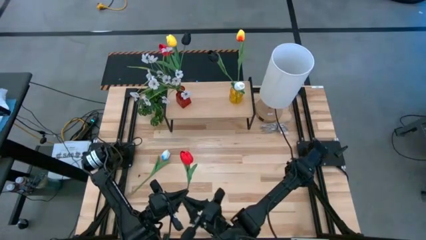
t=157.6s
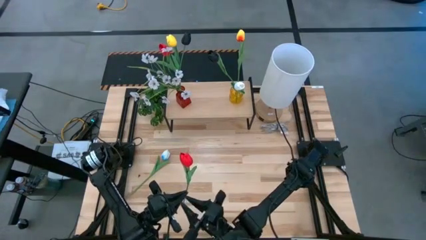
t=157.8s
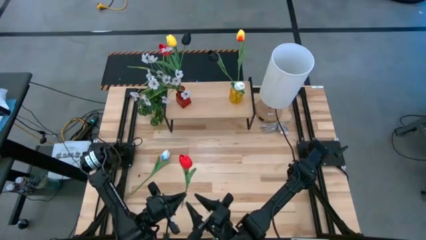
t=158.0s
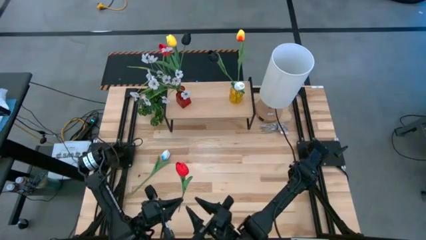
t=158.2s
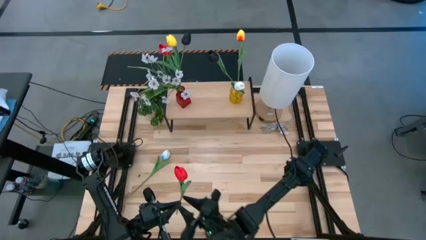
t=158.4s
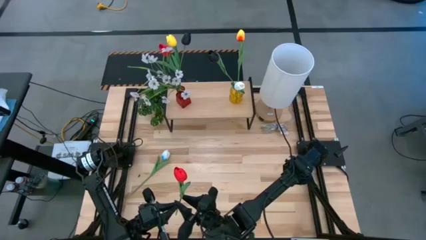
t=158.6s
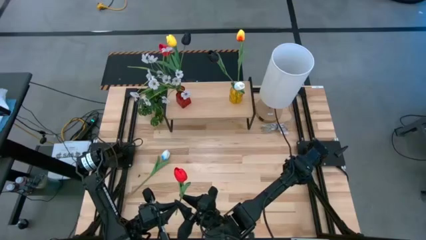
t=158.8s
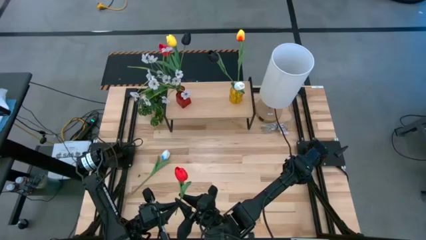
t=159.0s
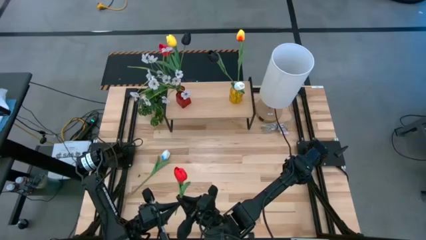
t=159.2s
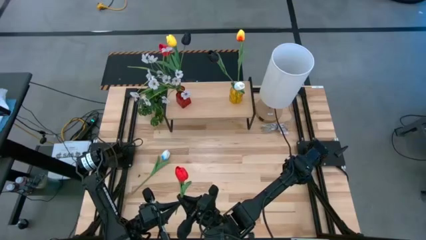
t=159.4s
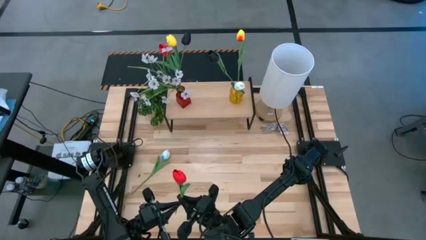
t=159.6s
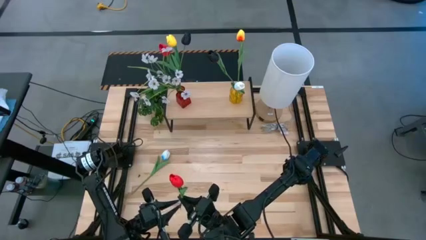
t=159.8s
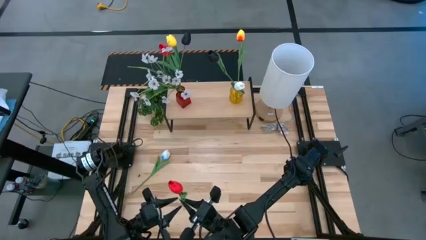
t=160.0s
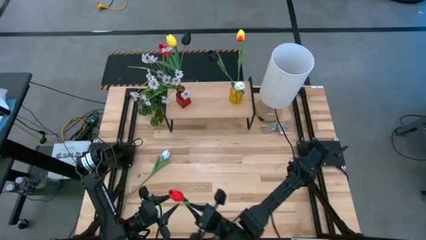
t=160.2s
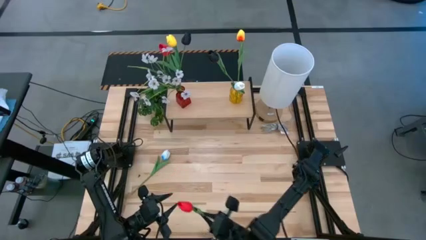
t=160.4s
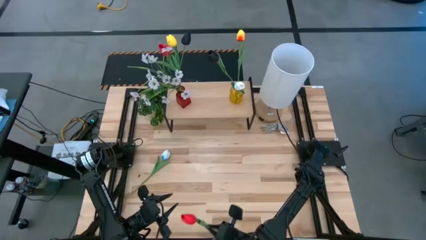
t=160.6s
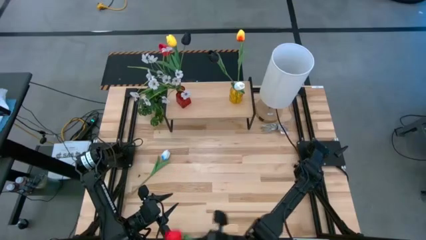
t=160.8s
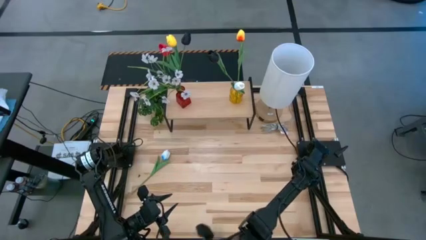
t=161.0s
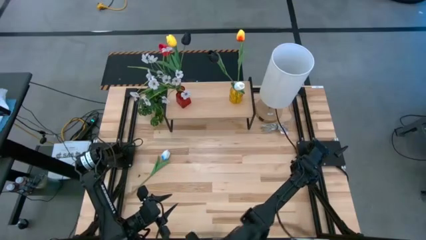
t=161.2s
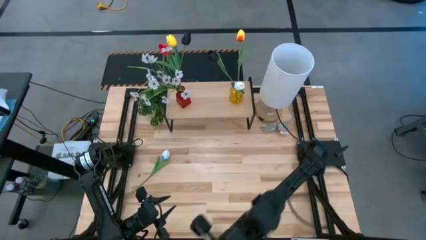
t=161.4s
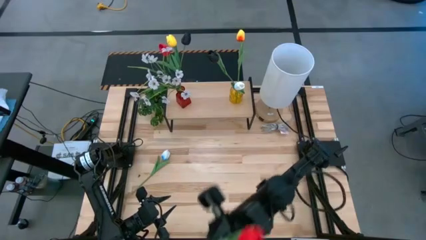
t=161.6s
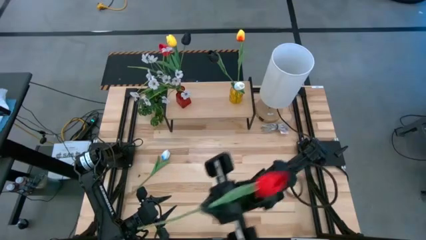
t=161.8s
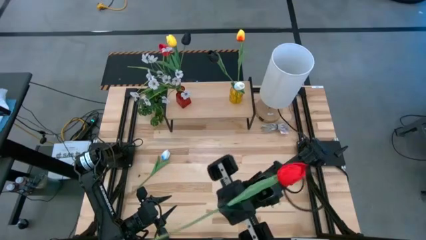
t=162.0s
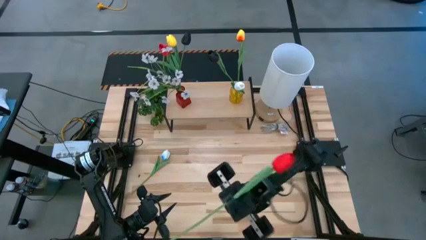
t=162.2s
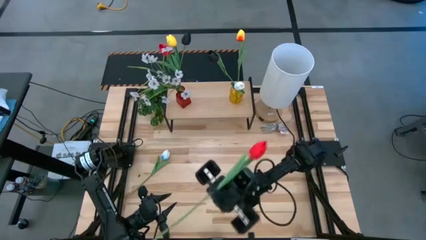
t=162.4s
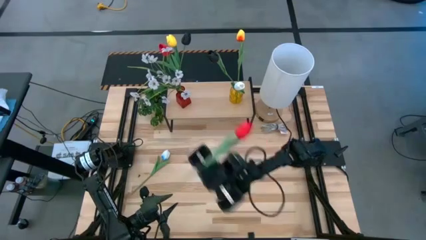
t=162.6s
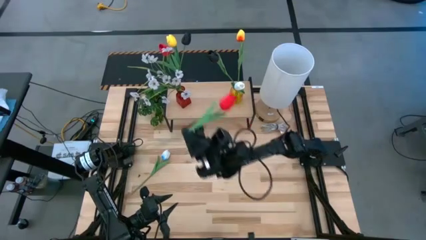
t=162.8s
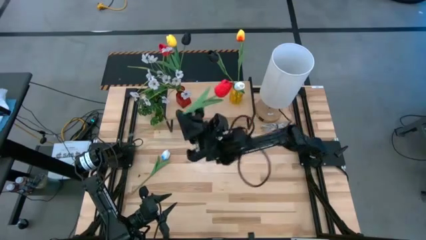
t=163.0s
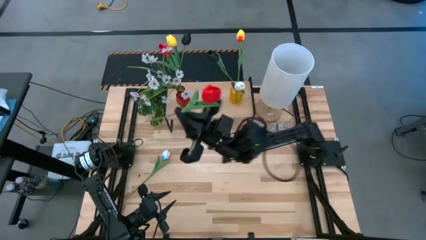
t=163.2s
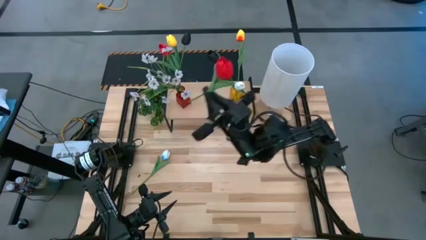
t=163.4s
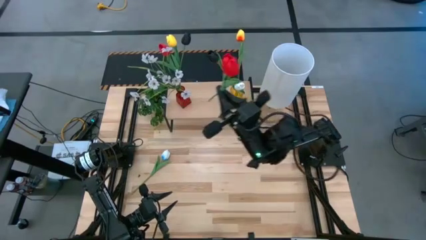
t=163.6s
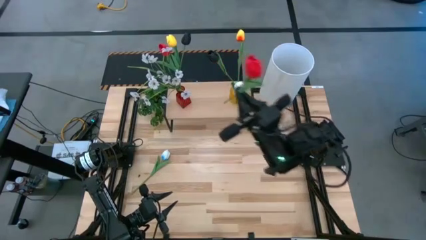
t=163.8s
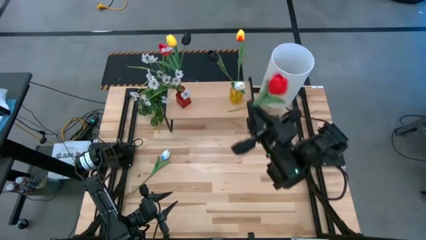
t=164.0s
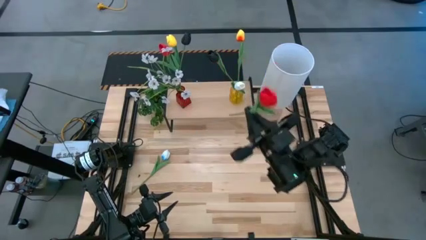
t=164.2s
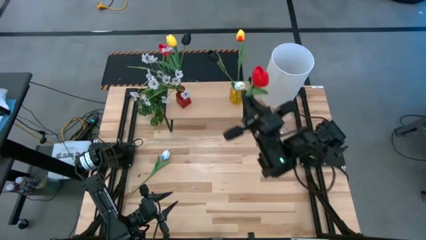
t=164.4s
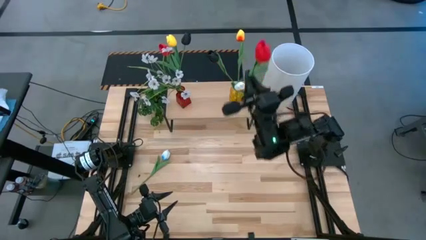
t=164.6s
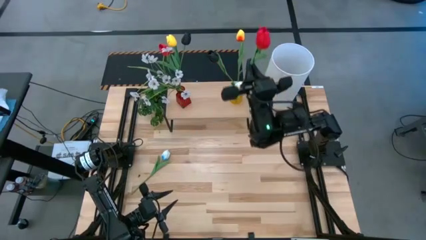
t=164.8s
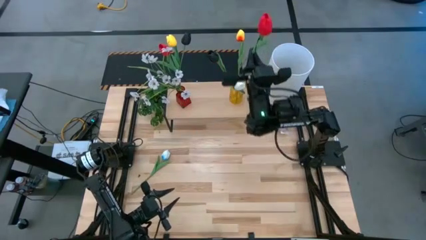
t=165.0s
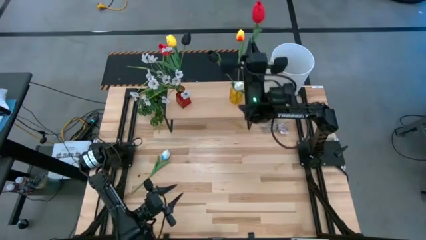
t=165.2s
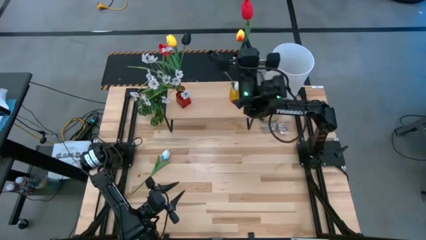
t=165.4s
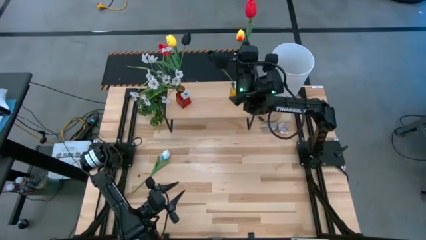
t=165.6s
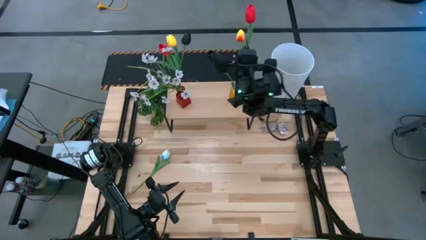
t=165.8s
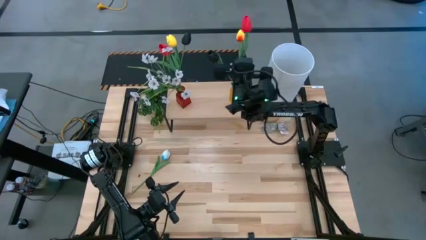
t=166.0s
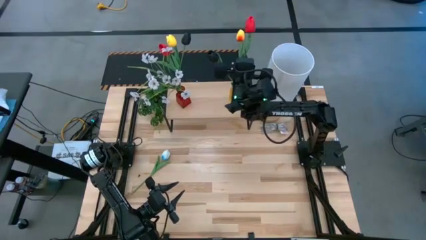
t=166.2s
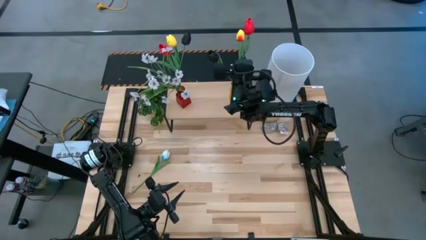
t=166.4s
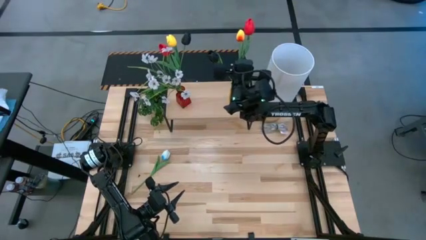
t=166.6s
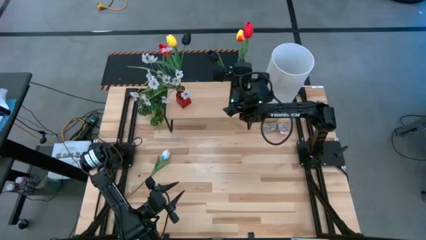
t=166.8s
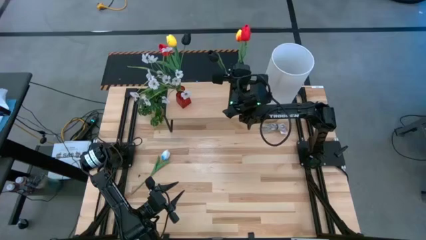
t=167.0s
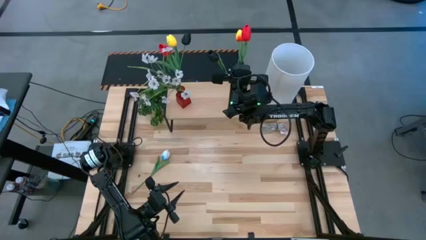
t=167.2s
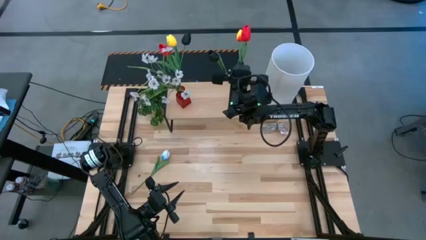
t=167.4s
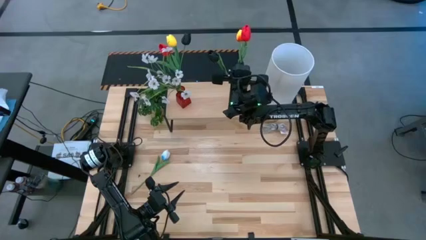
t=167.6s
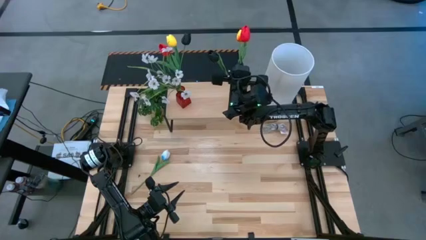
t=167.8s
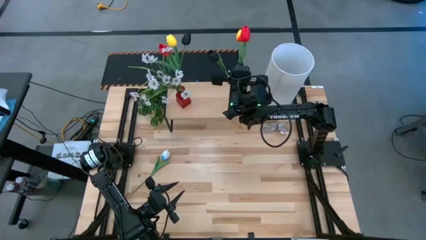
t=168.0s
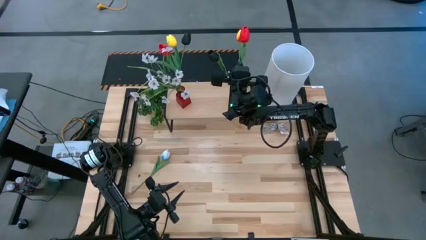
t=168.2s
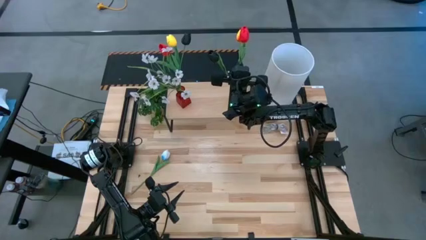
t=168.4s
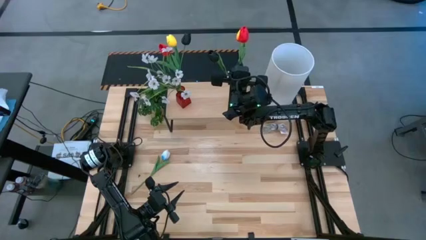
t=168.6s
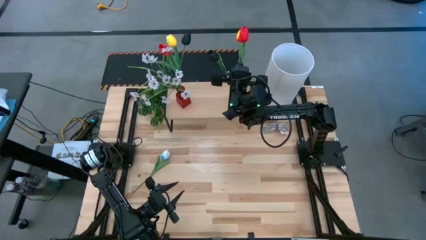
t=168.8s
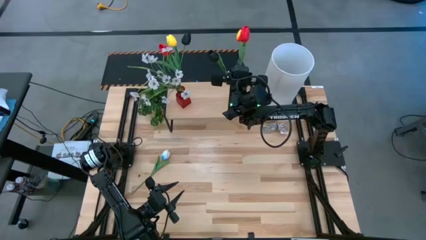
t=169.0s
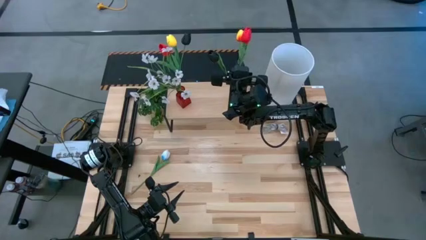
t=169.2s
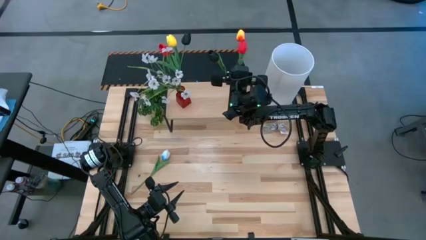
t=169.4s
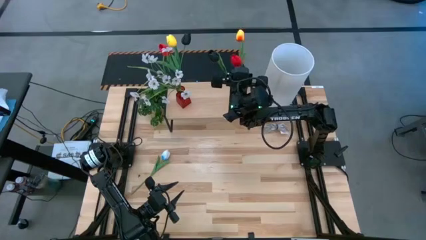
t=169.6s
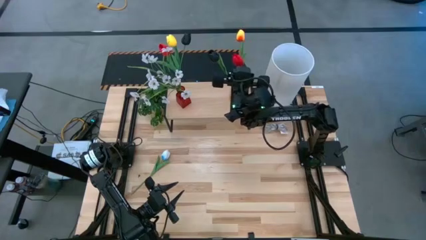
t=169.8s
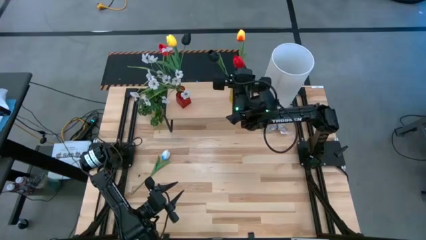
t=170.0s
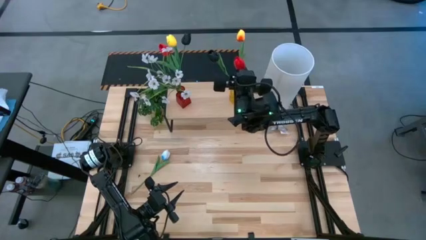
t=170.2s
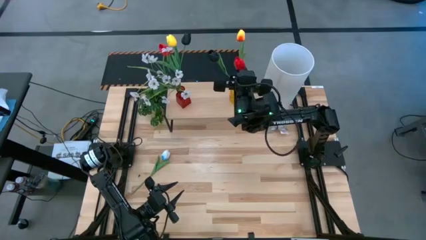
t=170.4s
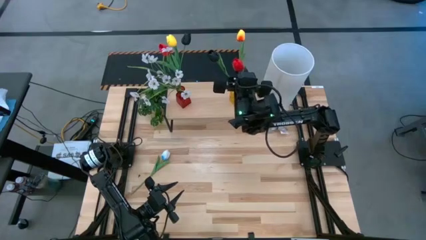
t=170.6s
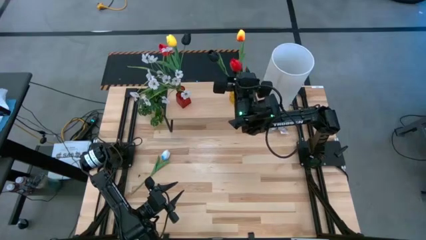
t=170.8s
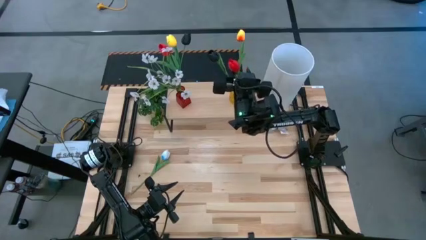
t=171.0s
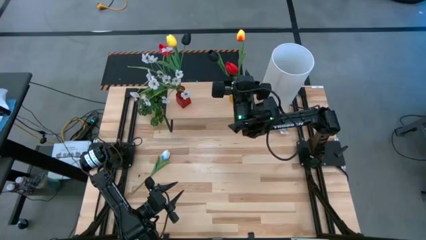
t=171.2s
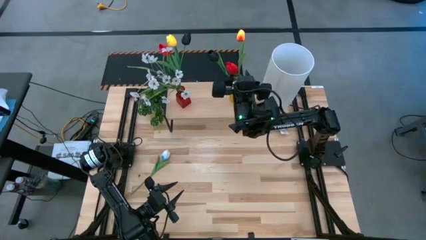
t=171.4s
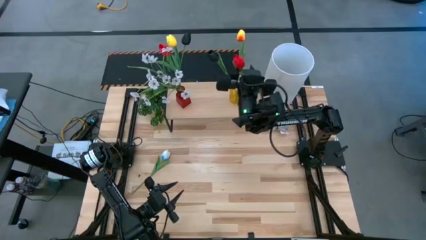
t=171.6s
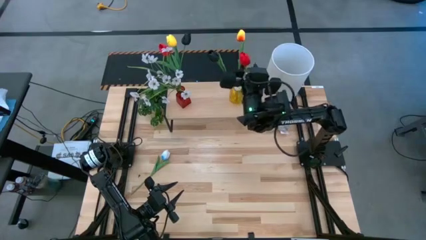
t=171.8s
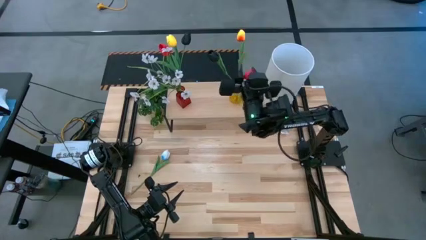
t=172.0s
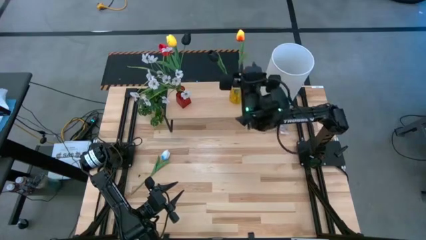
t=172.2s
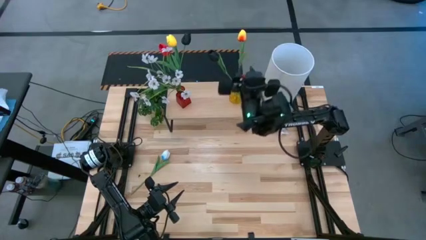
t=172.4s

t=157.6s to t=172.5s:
Task: Pick and place flowers into a vace then onto a shelf
Put the red flower into the yellow vase on the shelf
